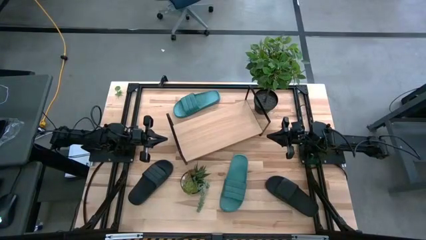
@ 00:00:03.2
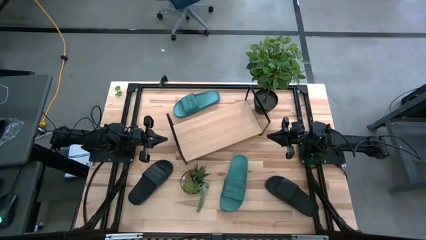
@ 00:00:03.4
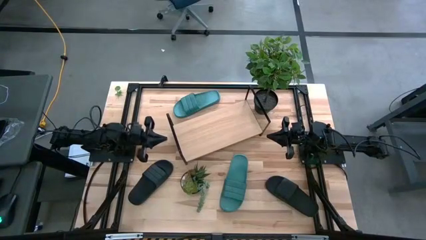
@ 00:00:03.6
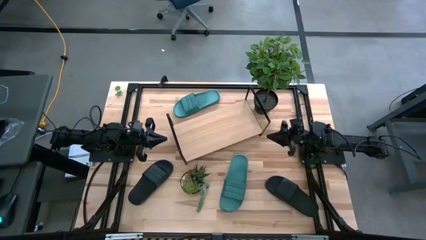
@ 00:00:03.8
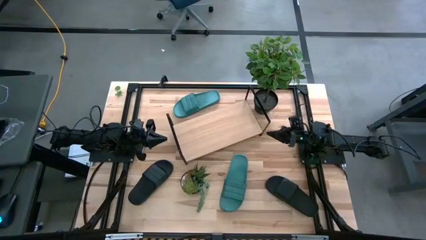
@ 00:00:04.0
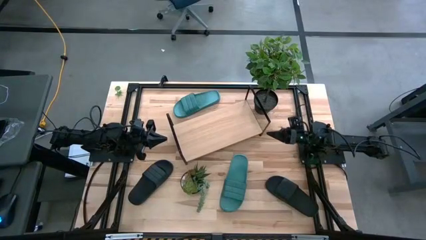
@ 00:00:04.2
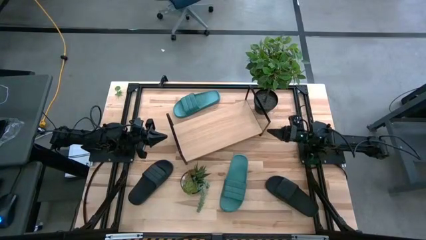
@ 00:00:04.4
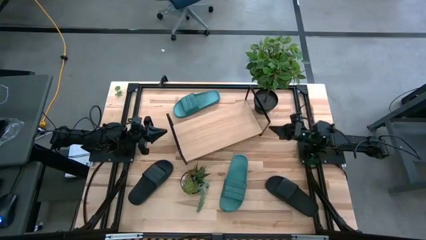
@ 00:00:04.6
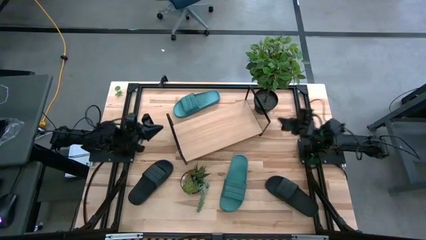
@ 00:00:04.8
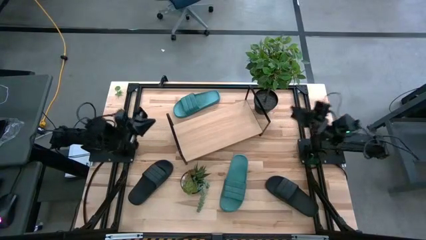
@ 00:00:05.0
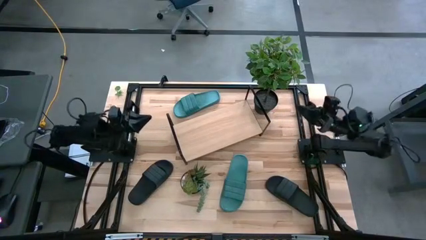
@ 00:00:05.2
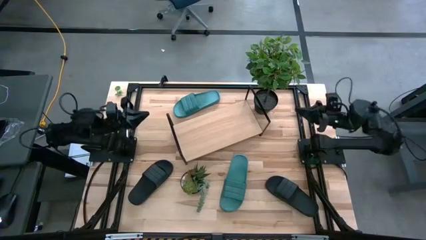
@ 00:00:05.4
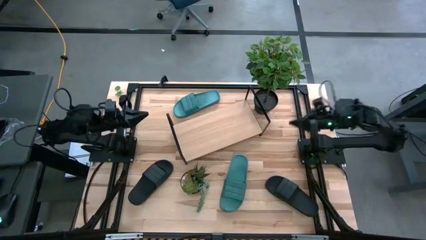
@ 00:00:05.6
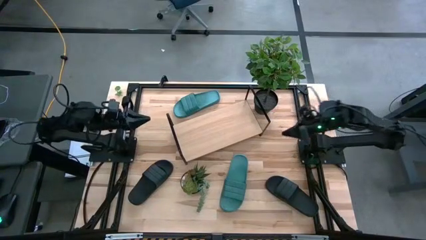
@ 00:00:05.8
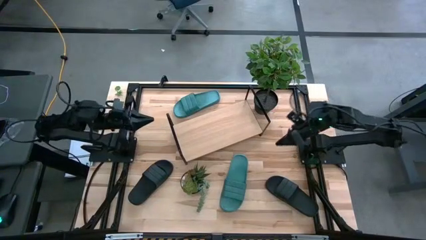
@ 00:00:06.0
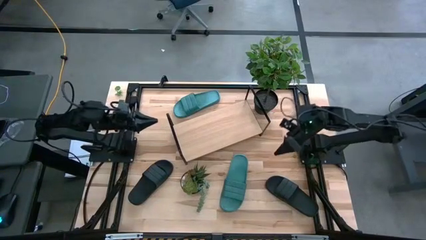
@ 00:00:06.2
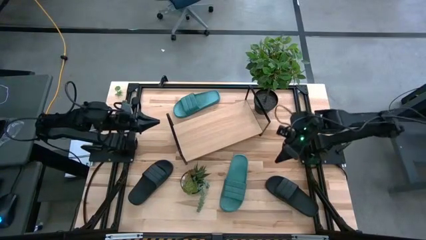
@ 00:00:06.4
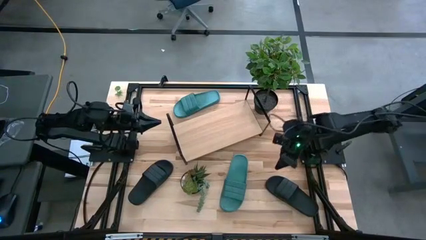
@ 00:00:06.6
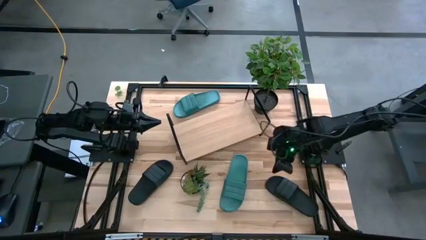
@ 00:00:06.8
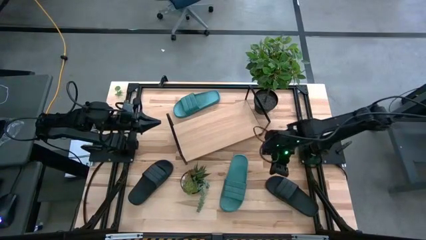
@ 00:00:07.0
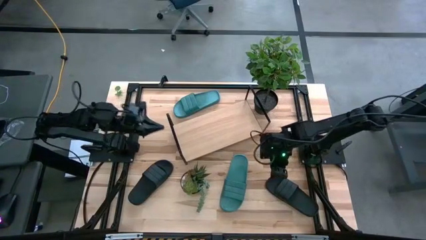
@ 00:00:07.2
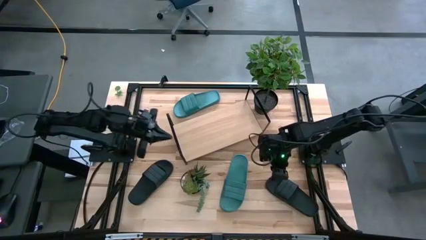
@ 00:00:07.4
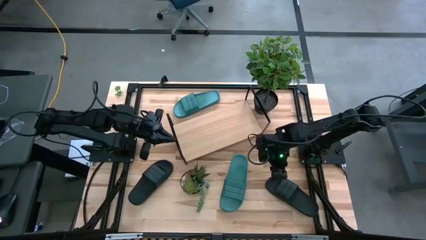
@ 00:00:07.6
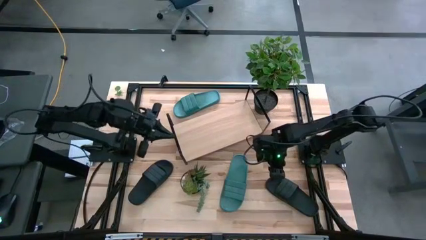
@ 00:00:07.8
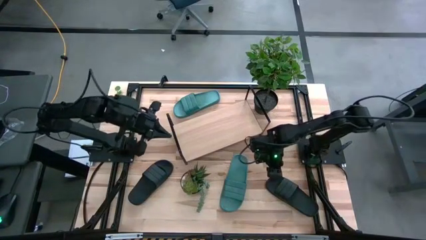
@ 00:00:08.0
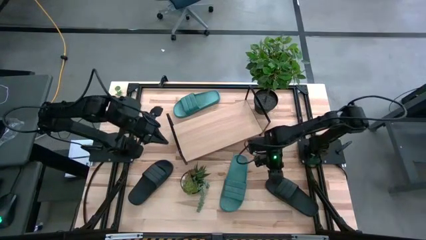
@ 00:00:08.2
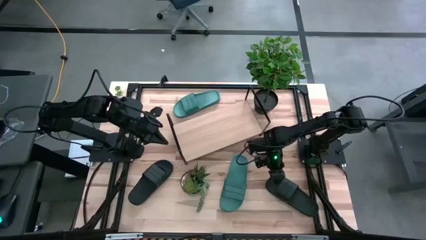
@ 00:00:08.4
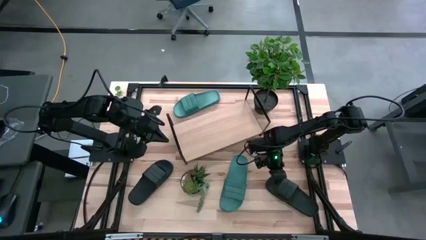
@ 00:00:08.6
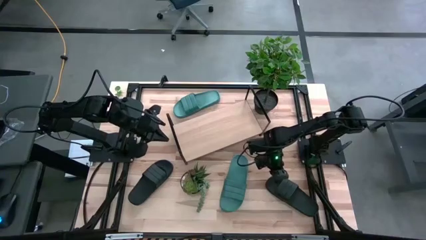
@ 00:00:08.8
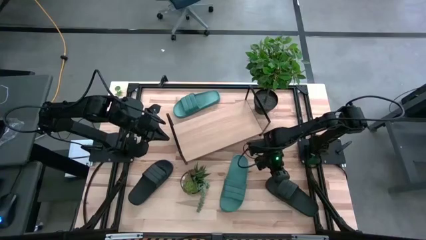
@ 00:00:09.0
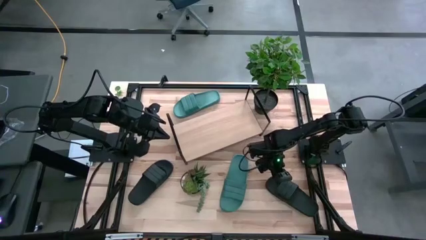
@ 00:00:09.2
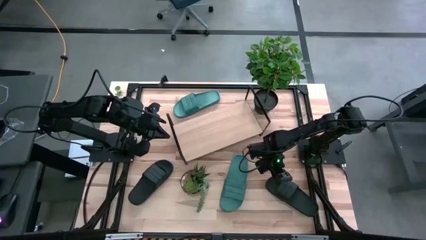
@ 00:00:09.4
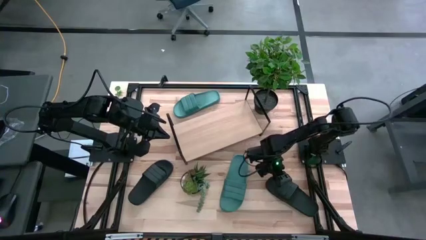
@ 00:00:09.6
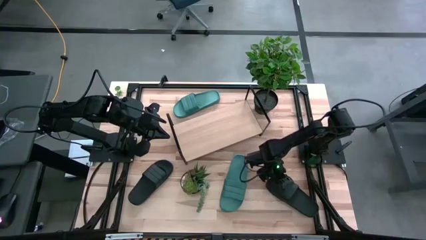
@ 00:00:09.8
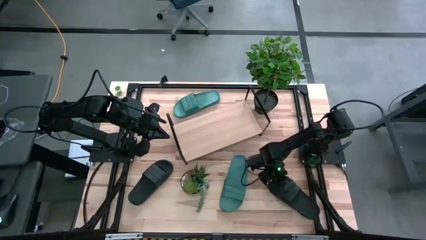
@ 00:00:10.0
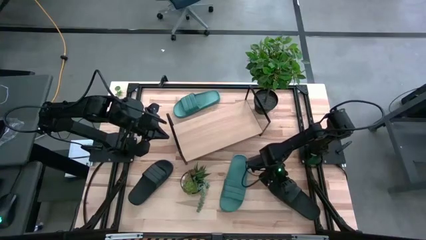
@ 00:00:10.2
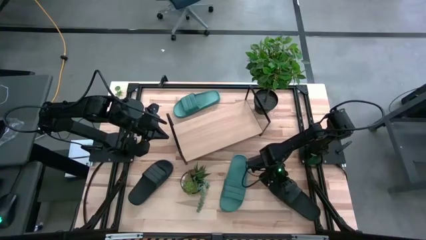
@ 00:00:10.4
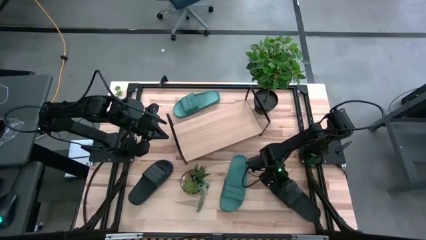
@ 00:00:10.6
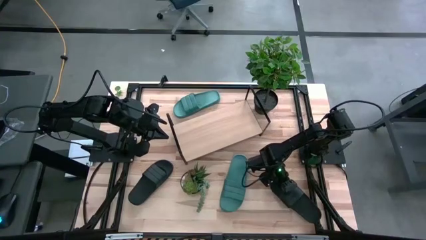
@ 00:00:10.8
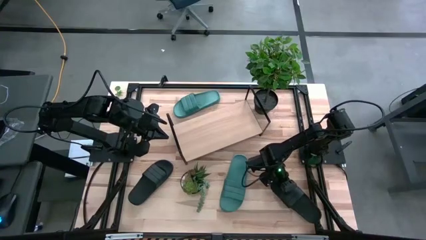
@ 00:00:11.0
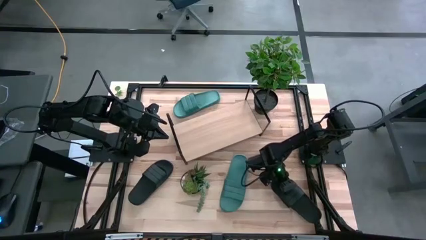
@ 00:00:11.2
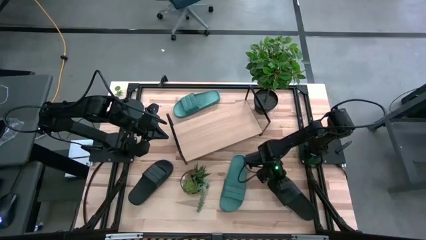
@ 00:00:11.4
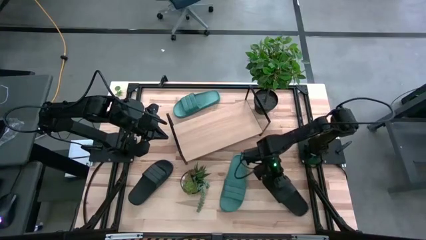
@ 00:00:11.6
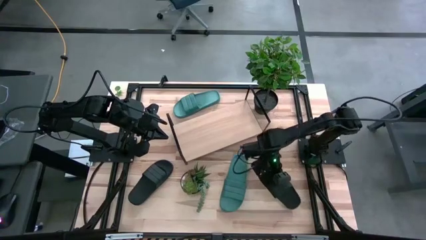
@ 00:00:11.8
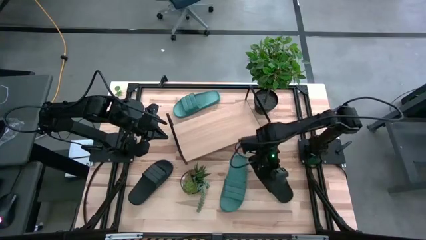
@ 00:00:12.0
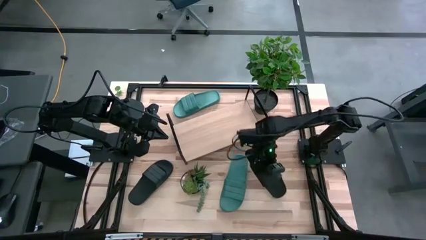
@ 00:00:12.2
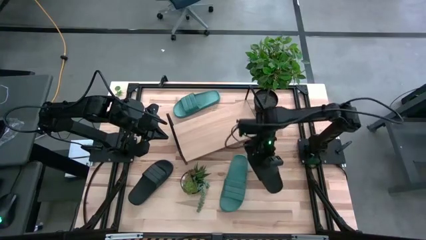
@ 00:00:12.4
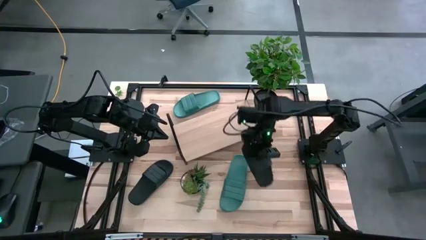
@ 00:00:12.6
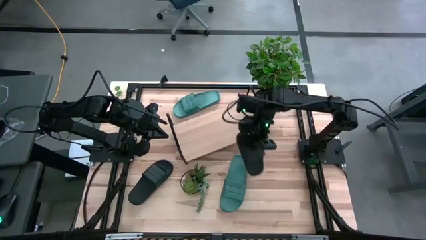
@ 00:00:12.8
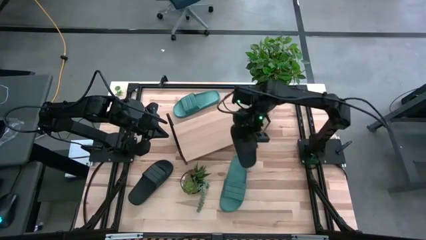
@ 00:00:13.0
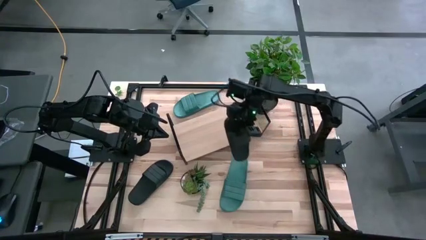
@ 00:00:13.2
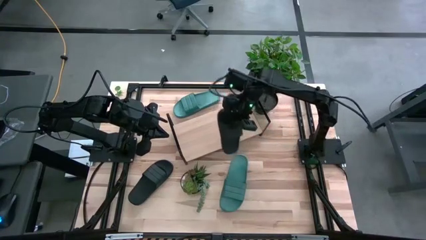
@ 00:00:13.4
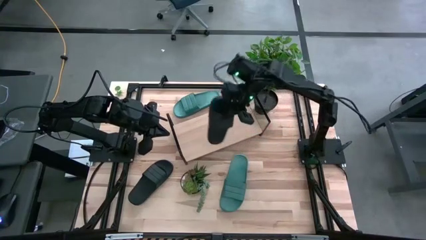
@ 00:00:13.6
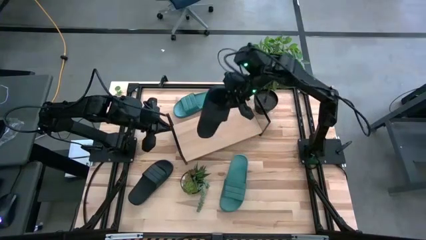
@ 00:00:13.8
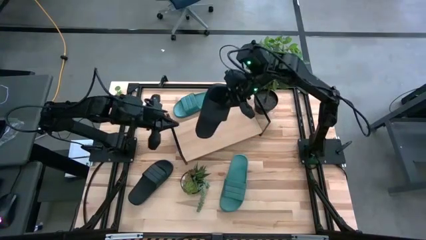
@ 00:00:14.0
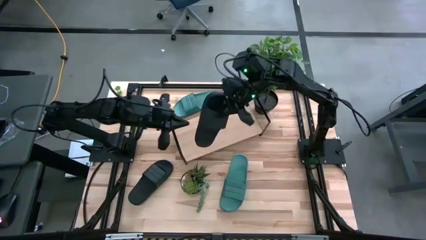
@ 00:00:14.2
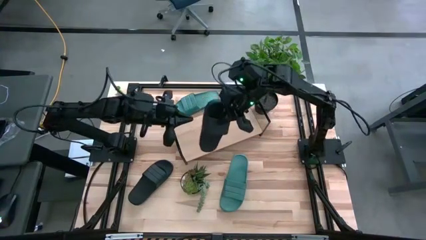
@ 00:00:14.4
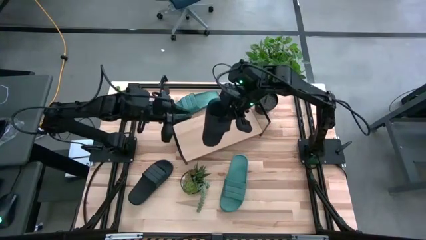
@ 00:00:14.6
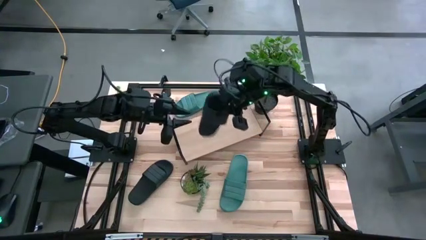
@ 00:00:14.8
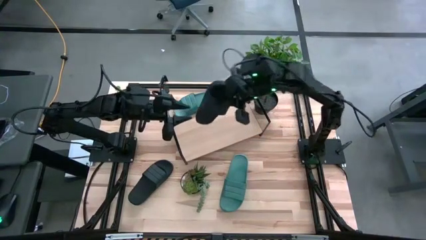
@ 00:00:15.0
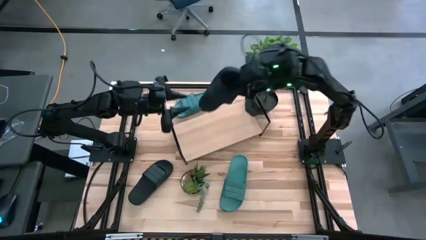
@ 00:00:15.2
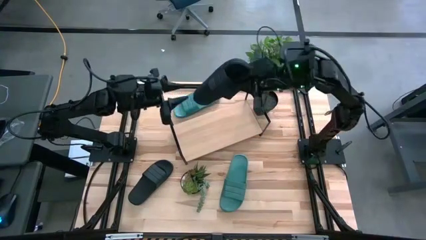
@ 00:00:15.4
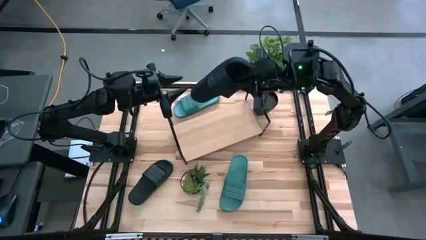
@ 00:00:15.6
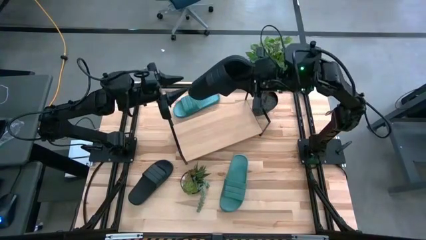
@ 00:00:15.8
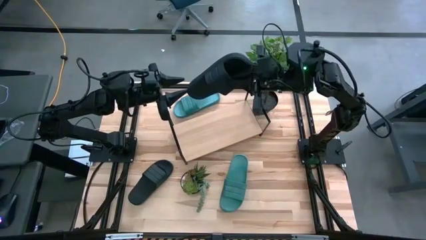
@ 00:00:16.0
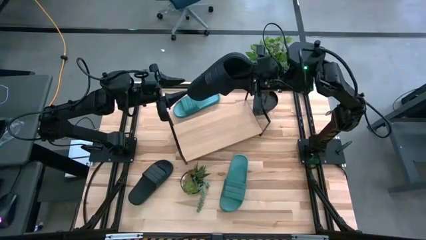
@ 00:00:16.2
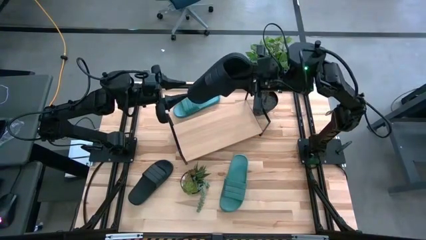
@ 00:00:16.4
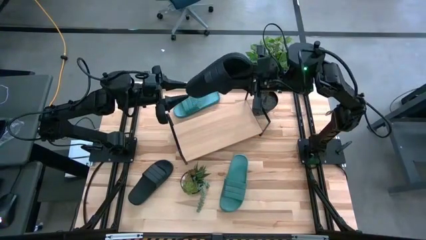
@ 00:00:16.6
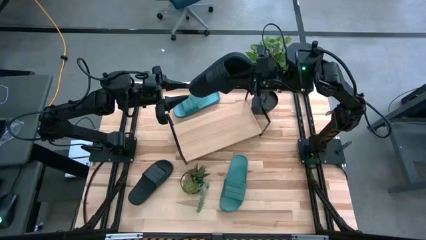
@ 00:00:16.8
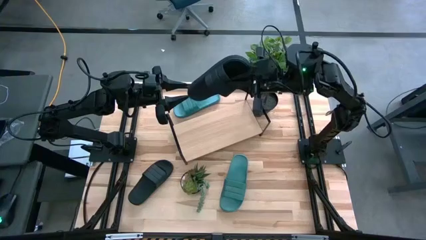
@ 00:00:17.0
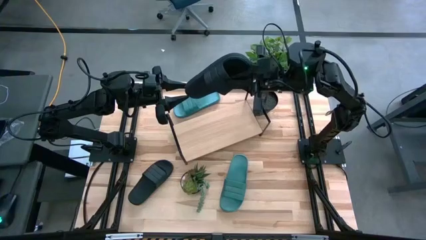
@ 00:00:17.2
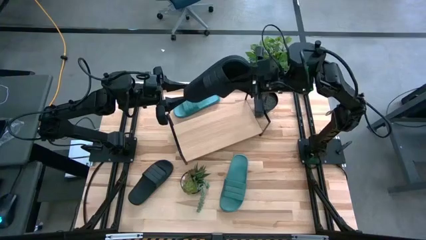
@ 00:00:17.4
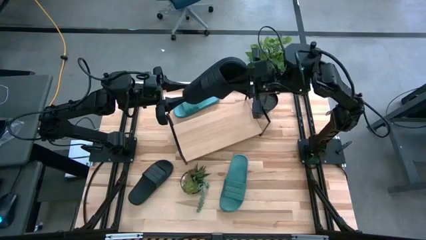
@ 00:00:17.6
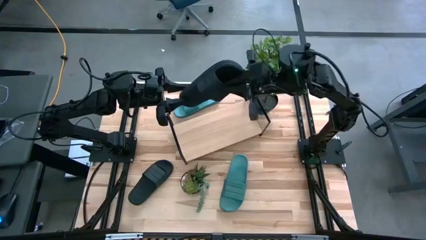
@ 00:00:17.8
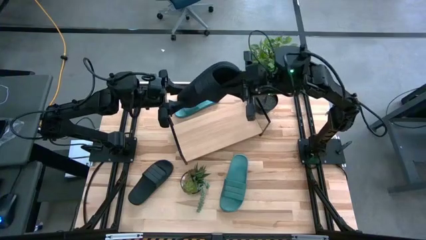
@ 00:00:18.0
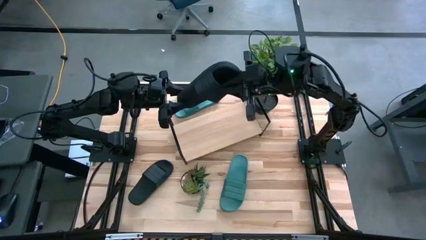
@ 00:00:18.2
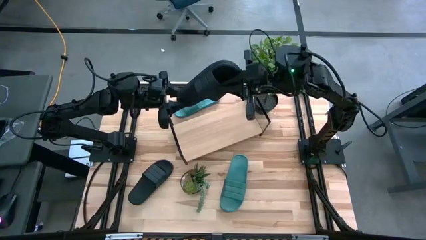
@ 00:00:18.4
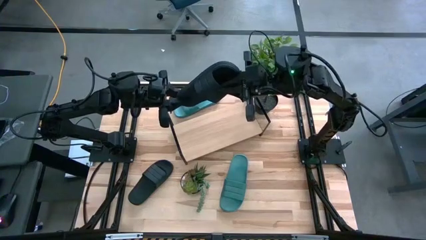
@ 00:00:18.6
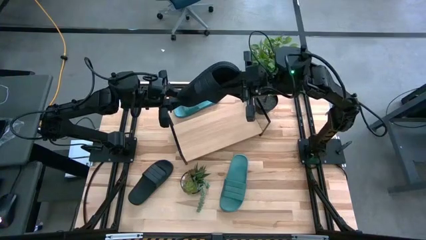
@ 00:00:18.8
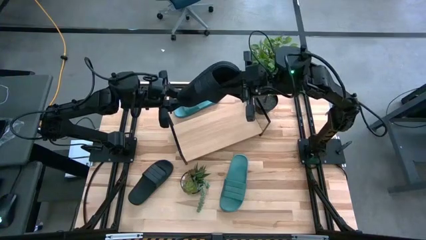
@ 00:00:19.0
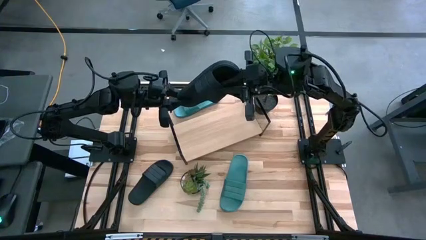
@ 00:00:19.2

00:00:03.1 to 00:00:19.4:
Task: Pick and place slides into the shelf
Put the right black slipper on the shelf
